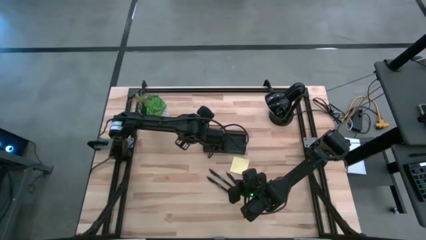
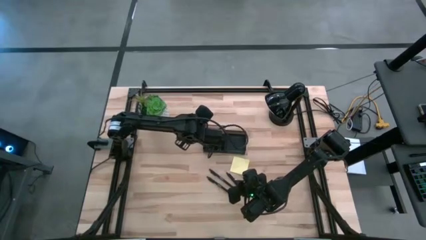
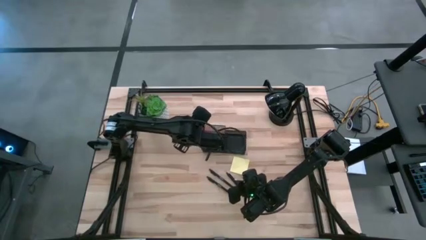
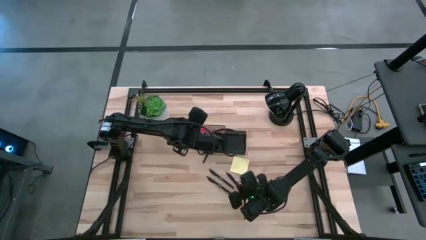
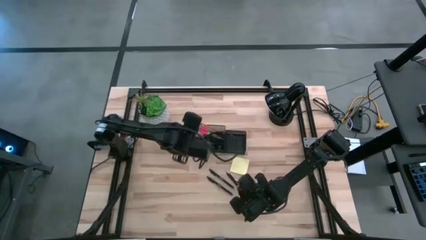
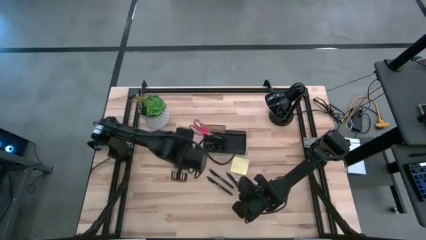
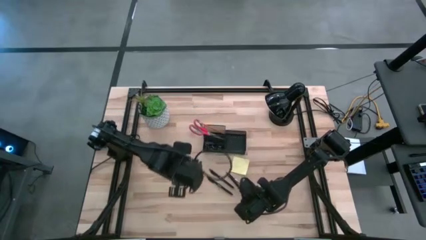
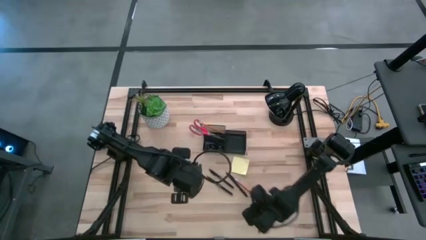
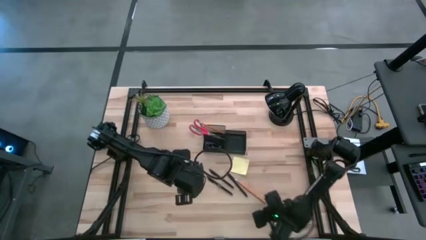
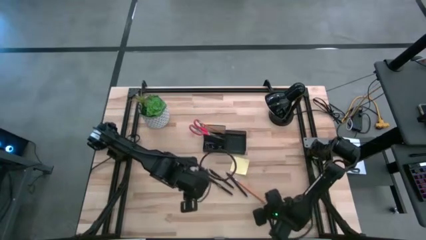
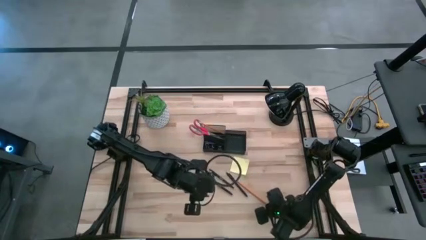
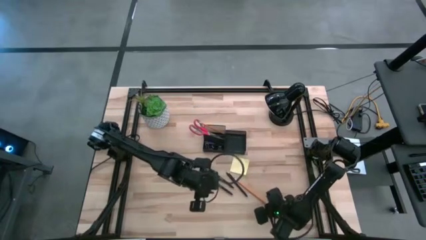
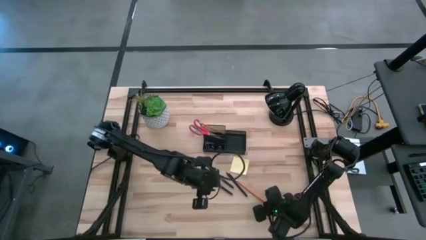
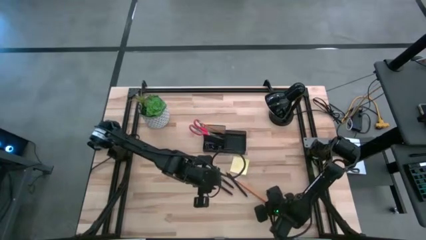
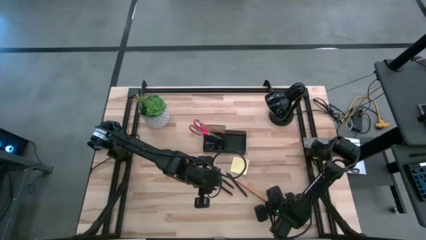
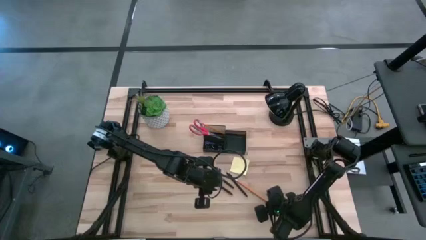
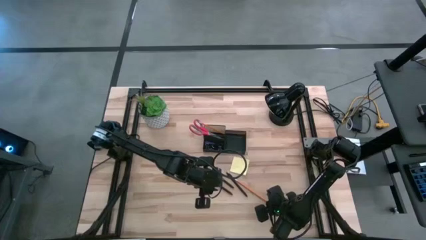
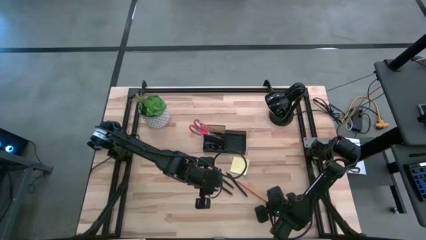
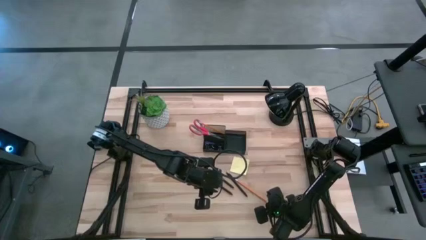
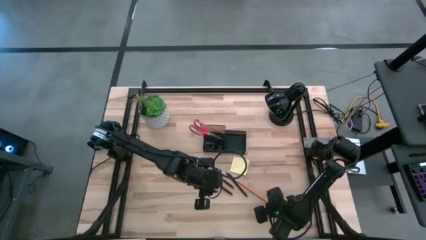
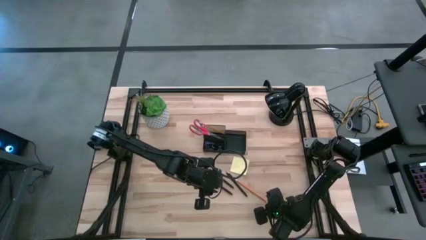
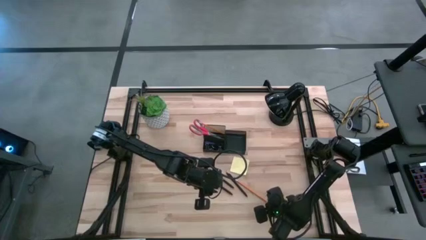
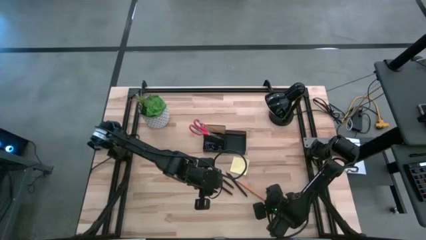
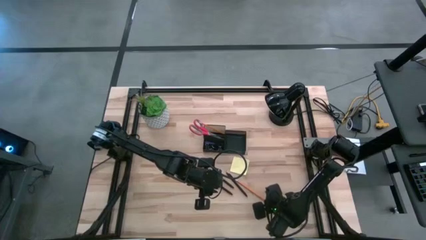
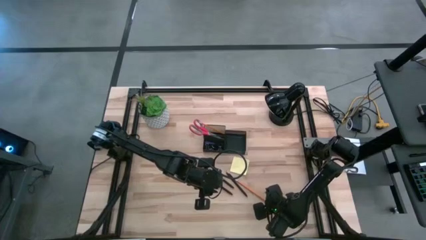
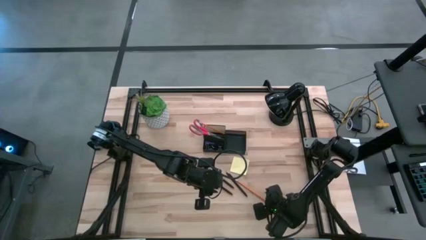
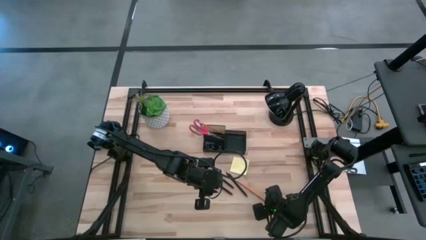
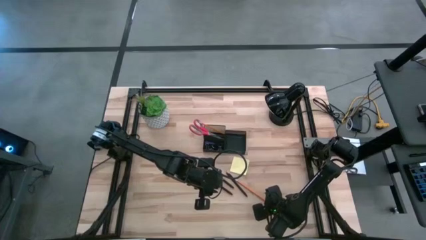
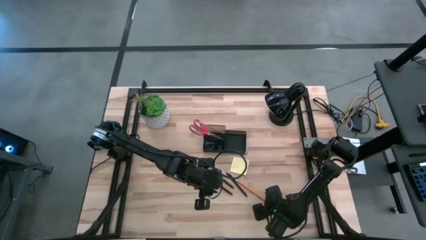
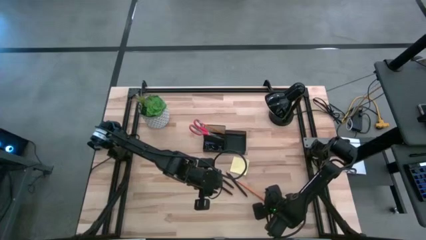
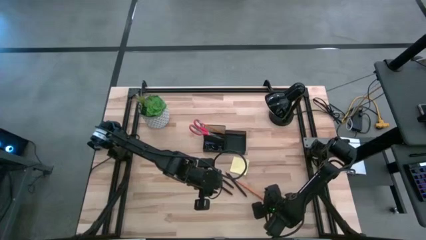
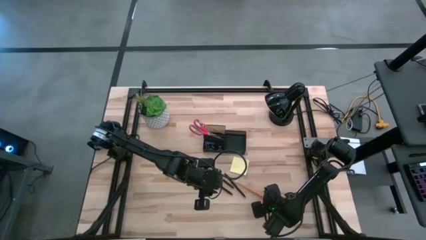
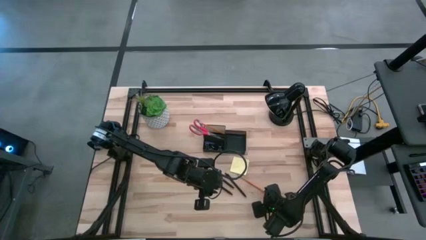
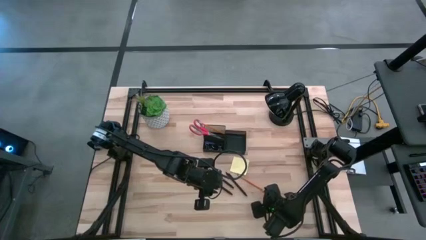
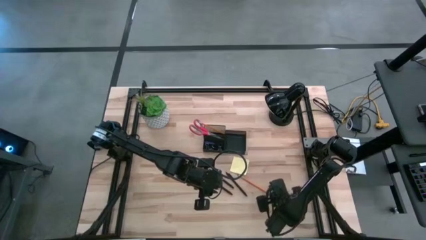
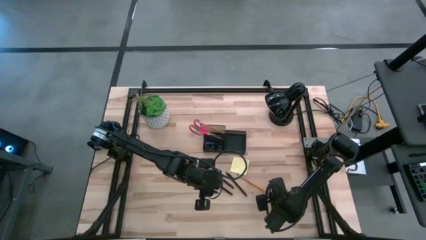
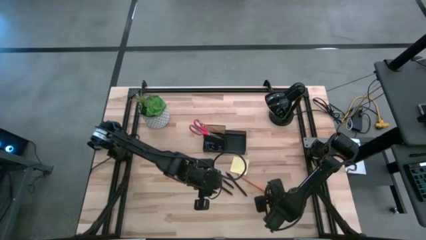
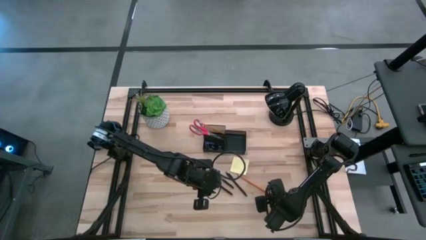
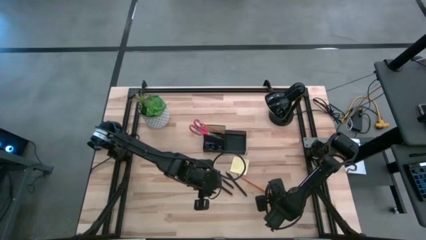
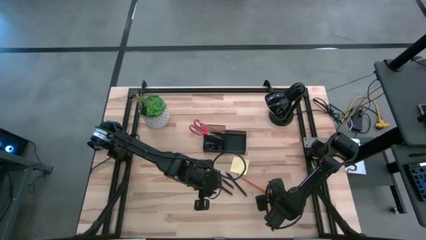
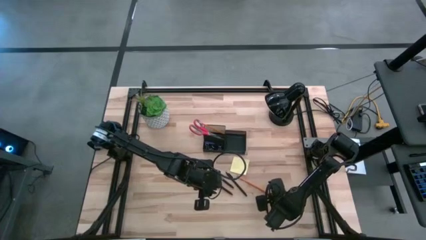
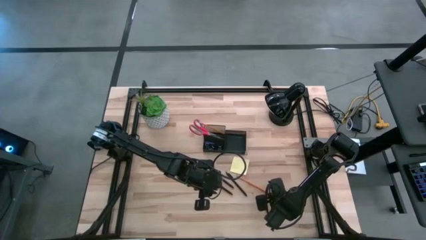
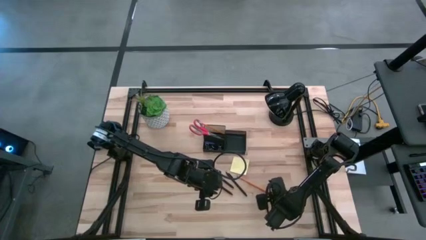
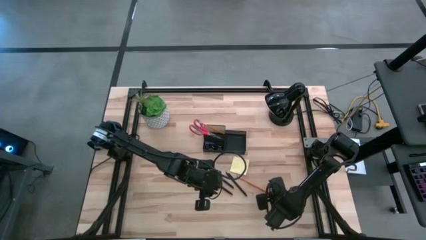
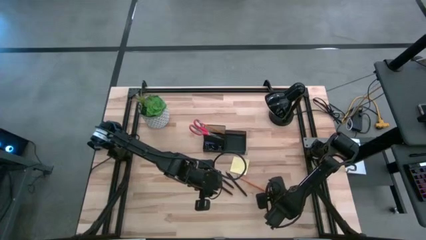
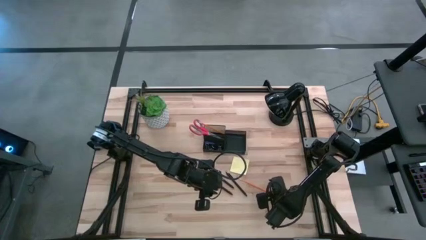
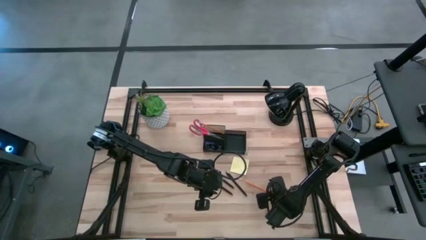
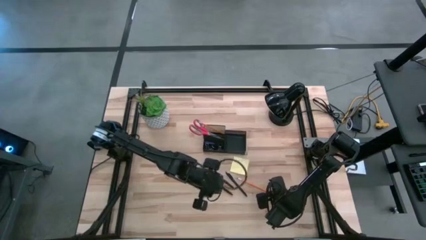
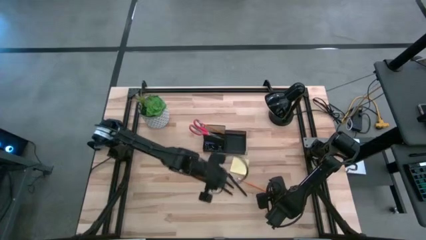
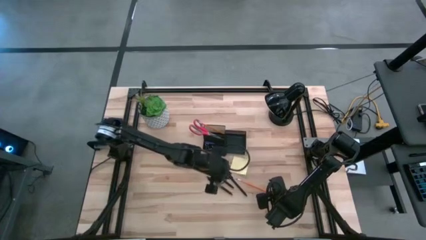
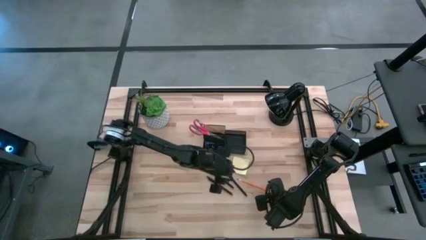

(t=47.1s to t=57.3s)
Task: Pick and place office supplies into organizer
Put the yellow pencil into the black desk organizer

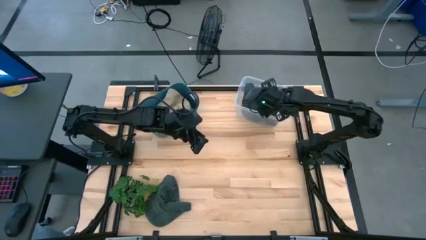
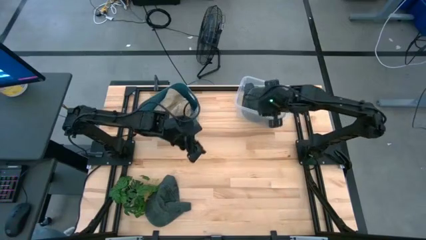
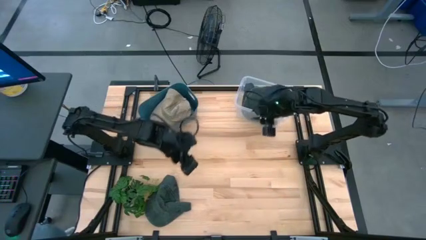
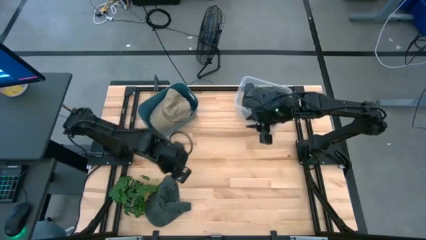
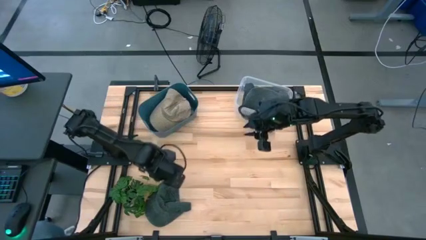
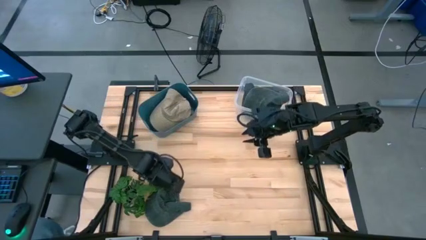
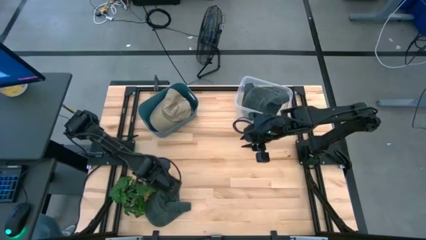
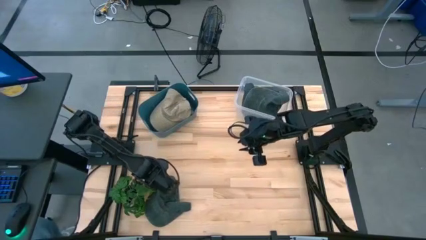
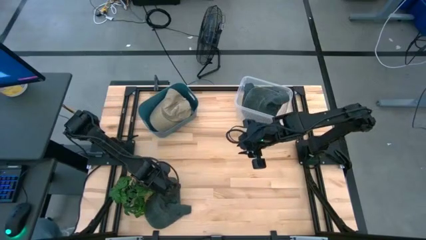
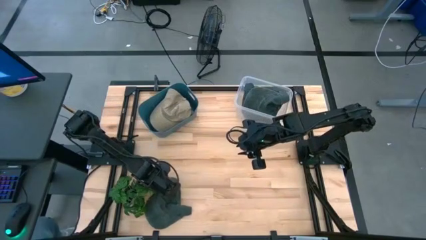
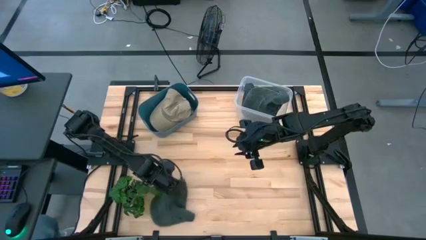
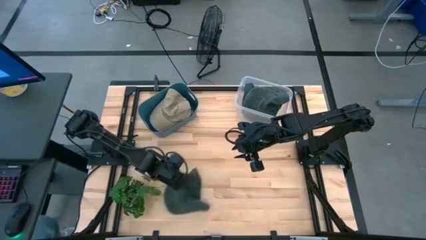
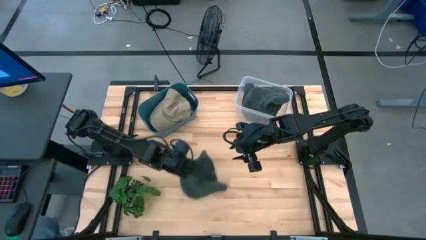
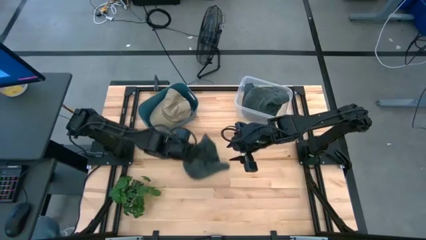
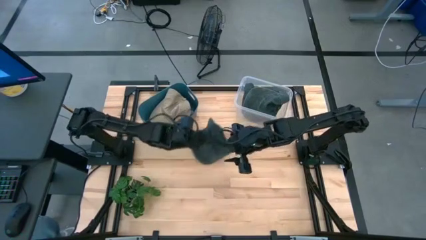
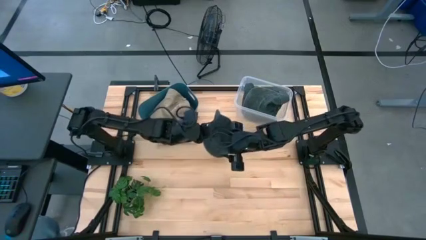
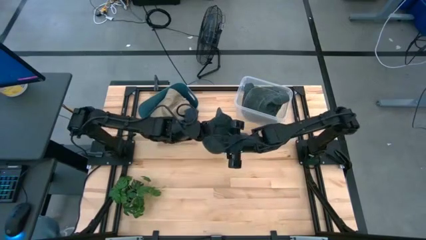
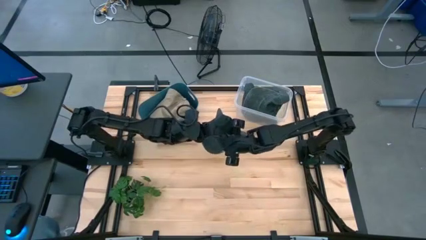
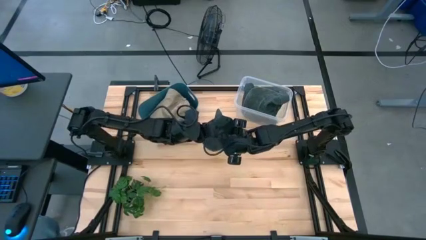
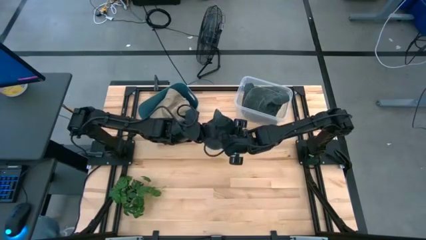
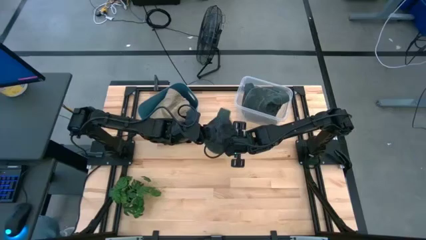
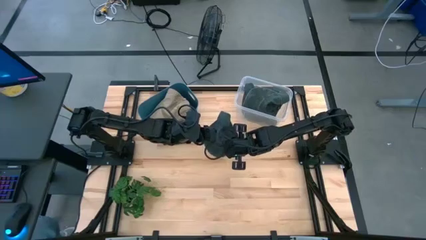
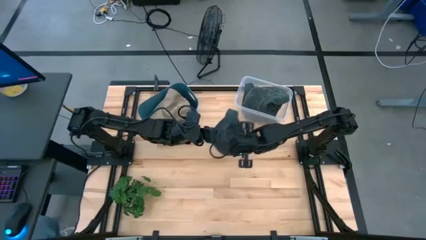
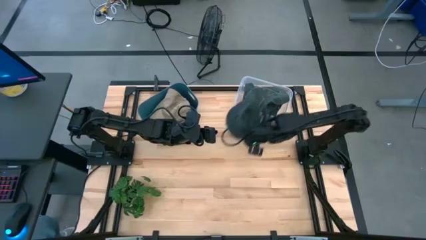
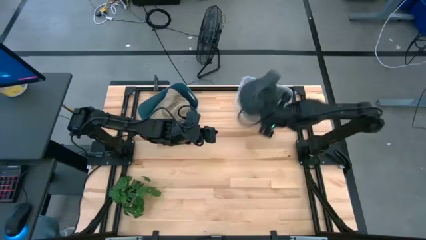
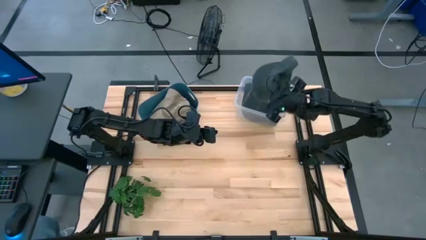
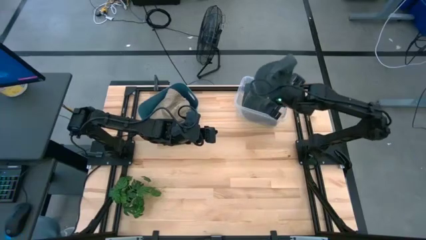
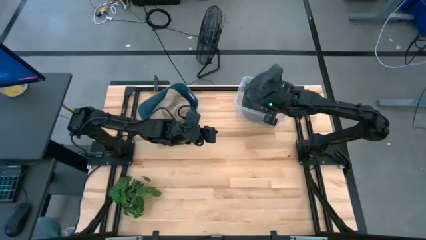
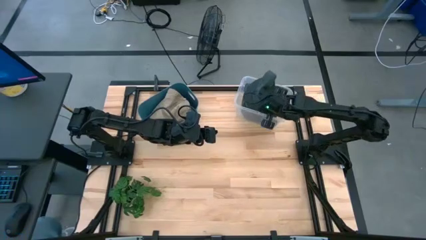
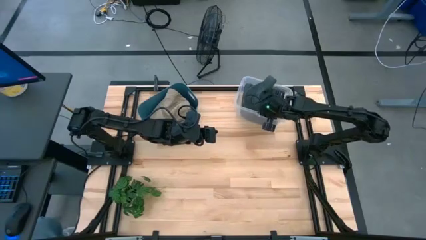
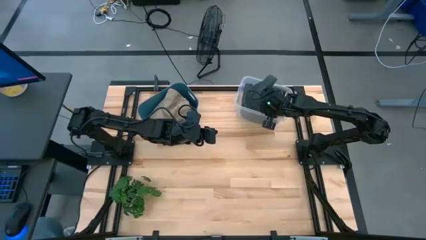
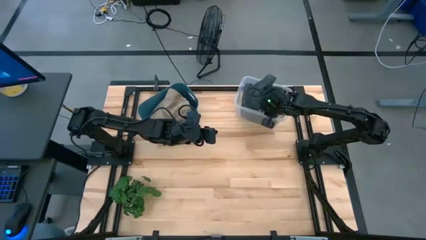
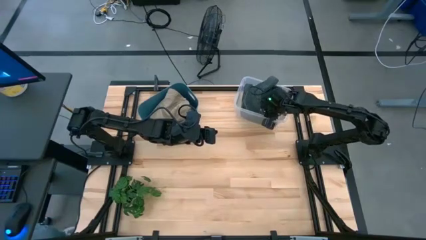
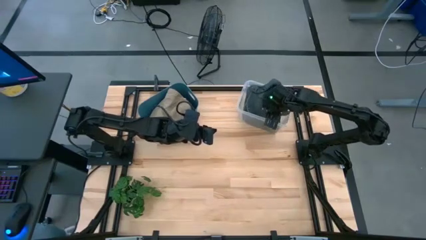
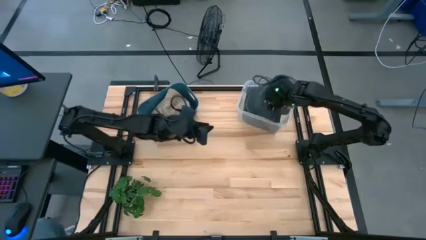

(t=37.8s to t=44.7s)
Task: Pick & Place hat
Put the black cap into the transparent bin
